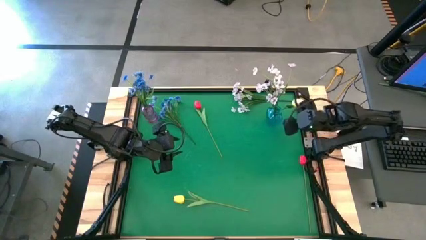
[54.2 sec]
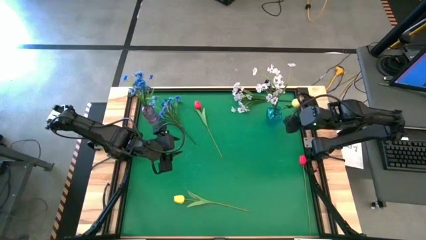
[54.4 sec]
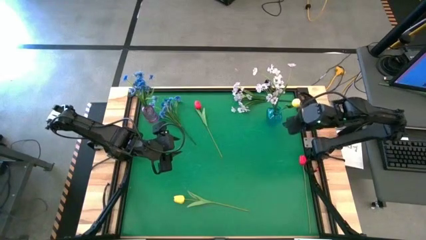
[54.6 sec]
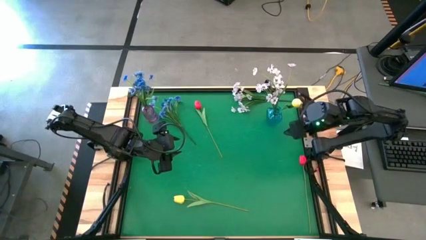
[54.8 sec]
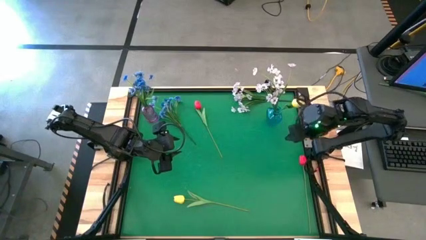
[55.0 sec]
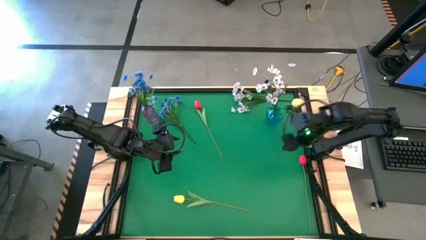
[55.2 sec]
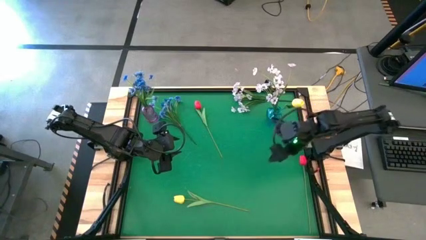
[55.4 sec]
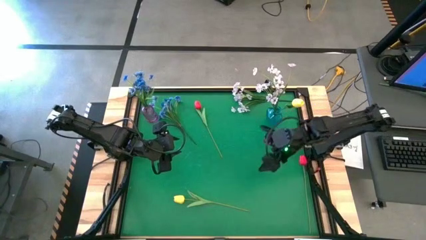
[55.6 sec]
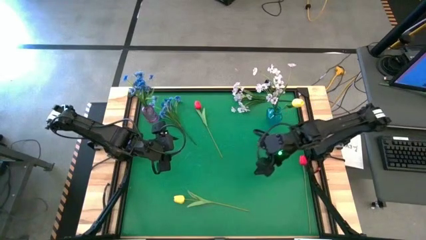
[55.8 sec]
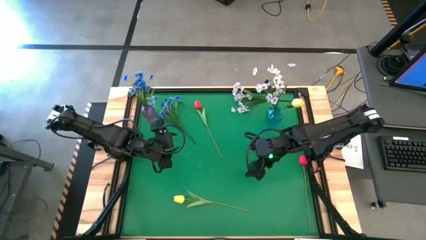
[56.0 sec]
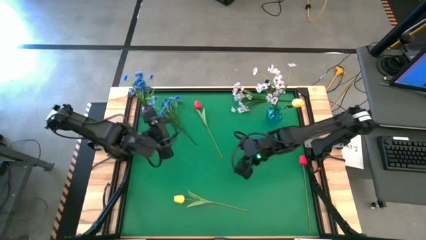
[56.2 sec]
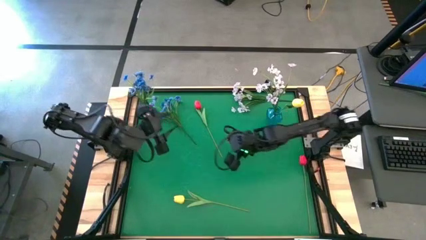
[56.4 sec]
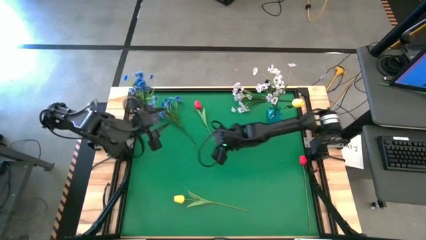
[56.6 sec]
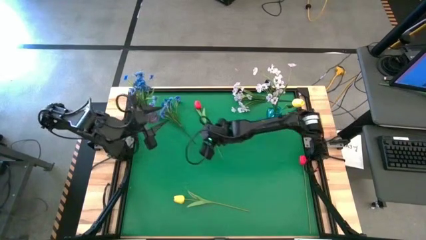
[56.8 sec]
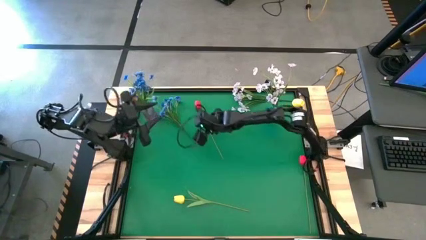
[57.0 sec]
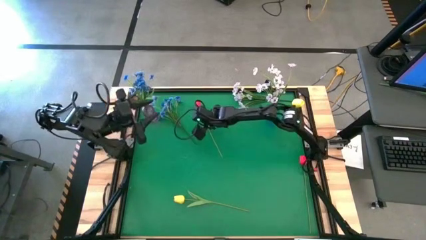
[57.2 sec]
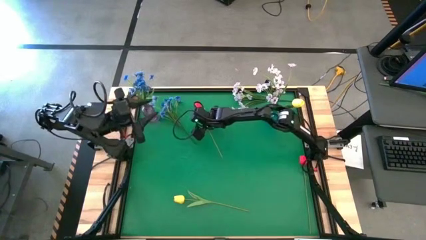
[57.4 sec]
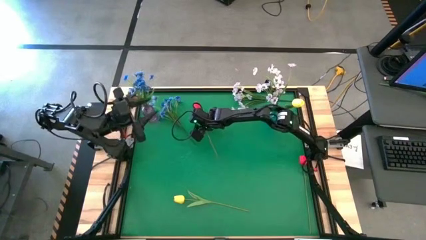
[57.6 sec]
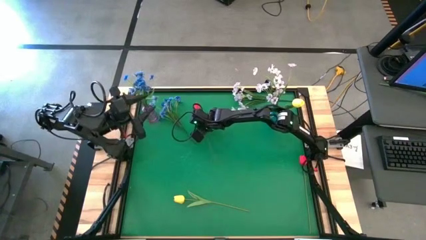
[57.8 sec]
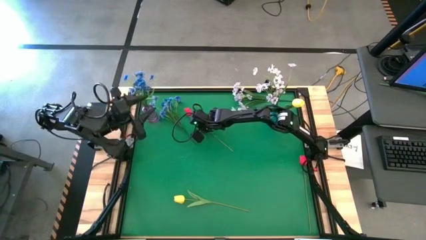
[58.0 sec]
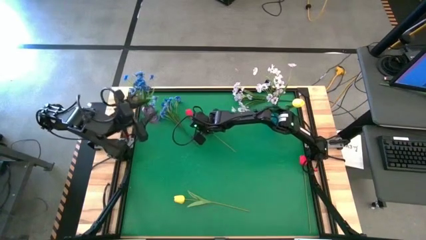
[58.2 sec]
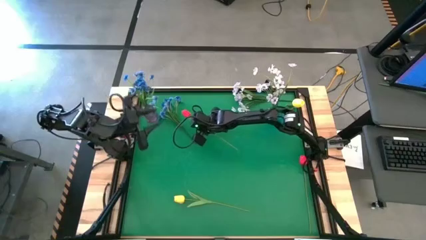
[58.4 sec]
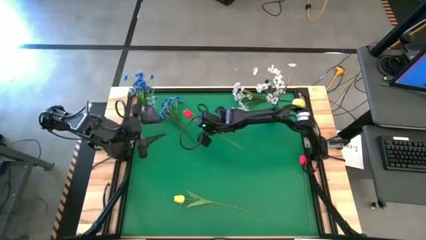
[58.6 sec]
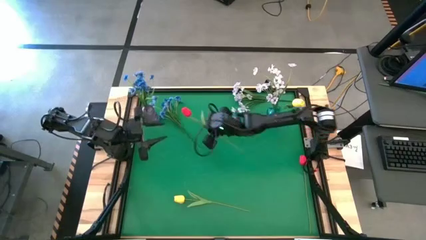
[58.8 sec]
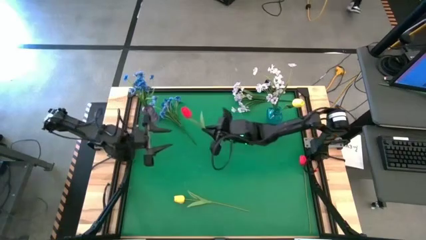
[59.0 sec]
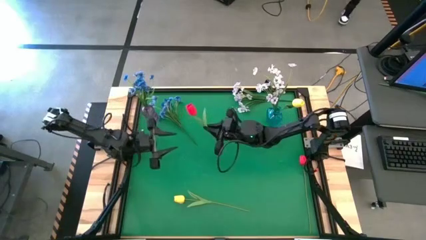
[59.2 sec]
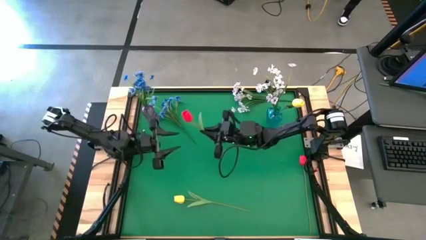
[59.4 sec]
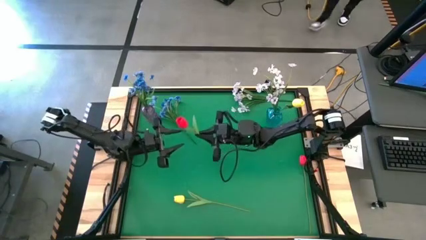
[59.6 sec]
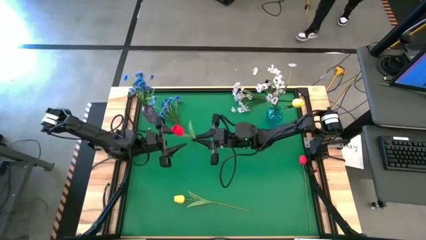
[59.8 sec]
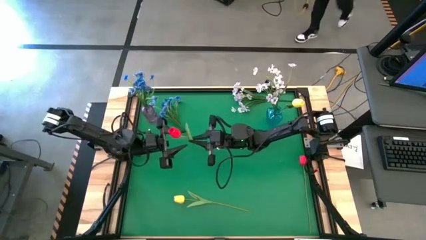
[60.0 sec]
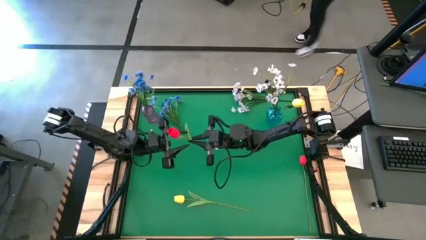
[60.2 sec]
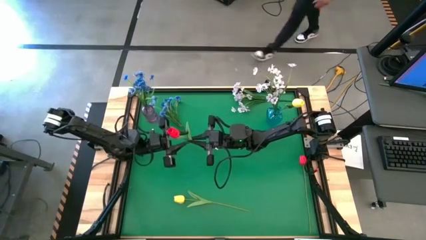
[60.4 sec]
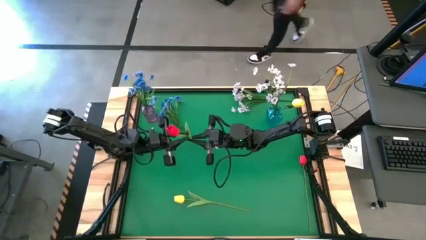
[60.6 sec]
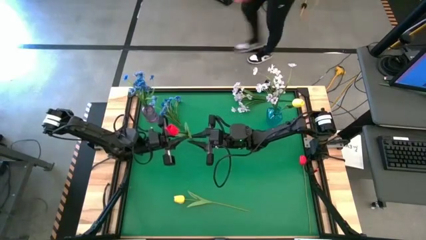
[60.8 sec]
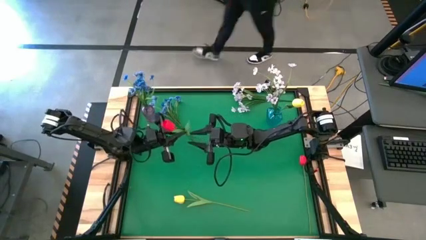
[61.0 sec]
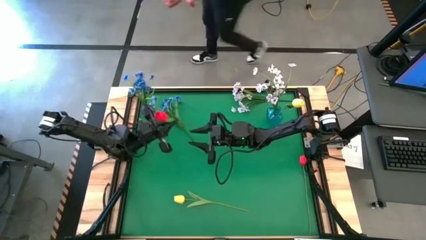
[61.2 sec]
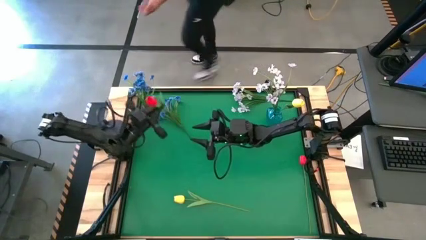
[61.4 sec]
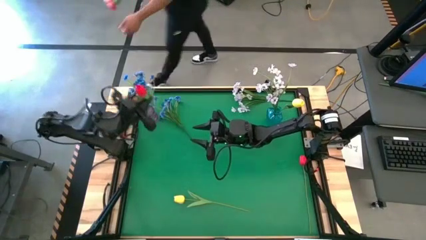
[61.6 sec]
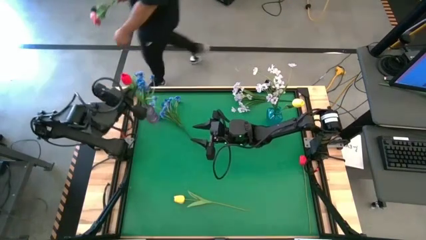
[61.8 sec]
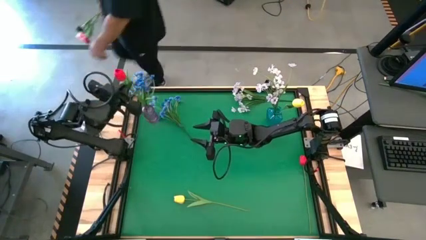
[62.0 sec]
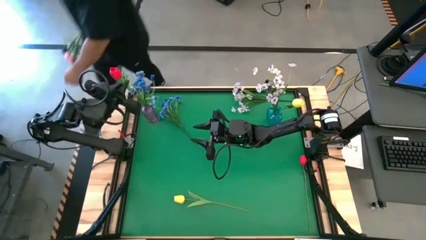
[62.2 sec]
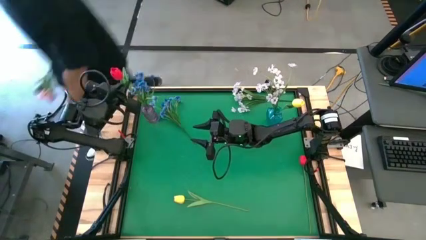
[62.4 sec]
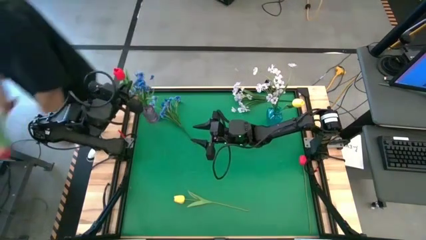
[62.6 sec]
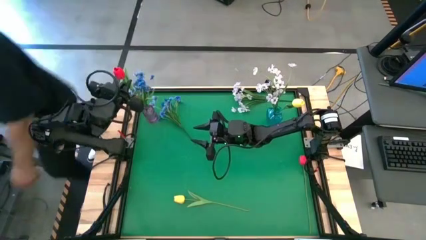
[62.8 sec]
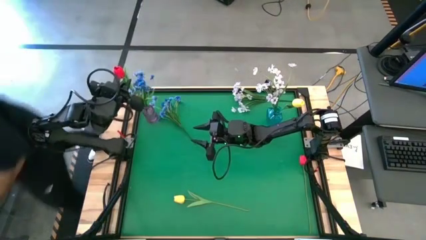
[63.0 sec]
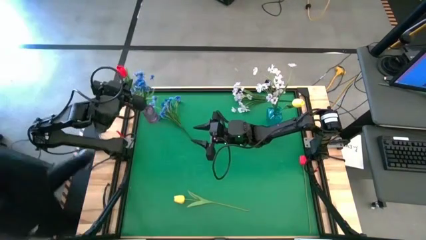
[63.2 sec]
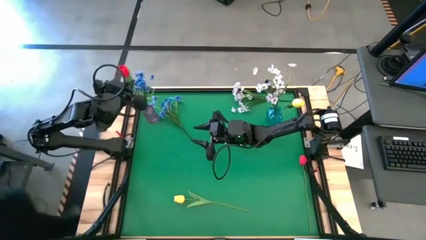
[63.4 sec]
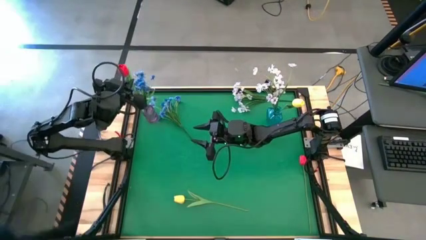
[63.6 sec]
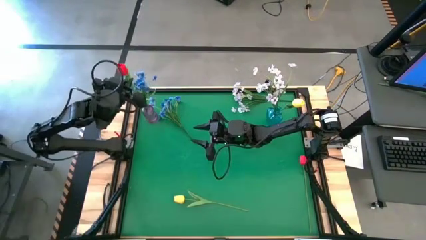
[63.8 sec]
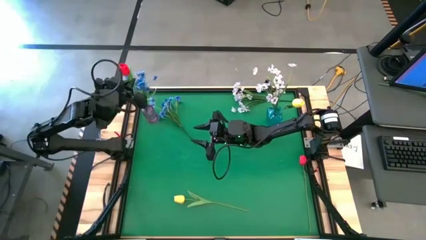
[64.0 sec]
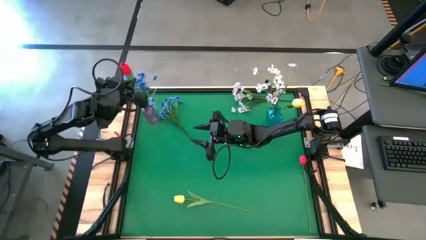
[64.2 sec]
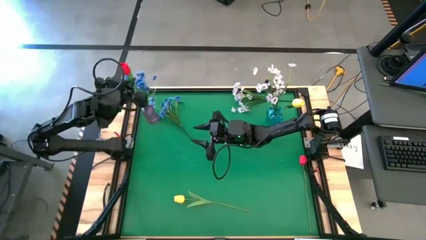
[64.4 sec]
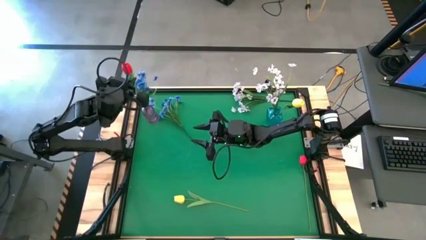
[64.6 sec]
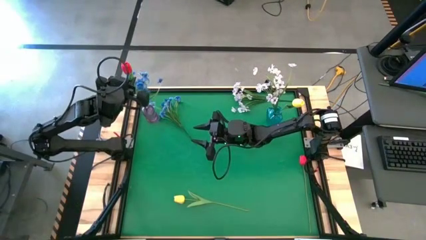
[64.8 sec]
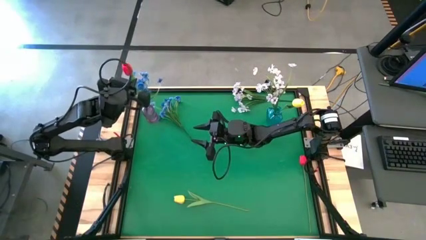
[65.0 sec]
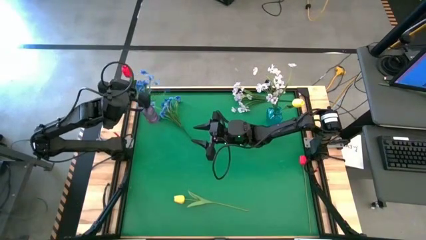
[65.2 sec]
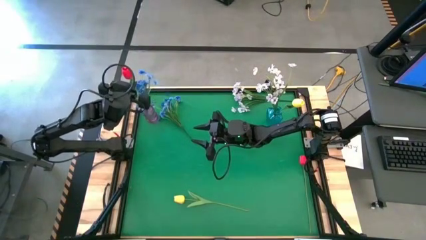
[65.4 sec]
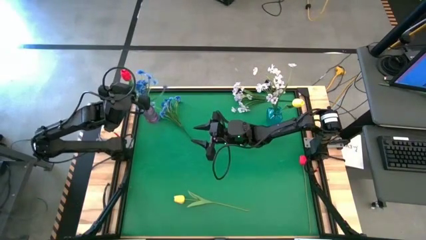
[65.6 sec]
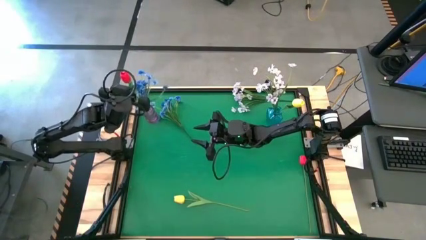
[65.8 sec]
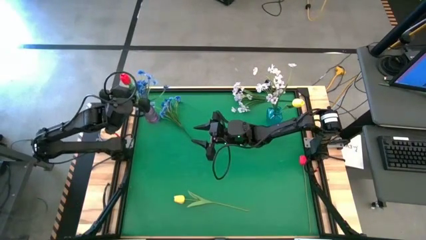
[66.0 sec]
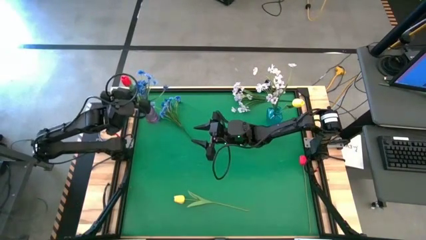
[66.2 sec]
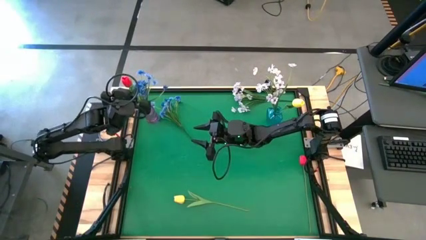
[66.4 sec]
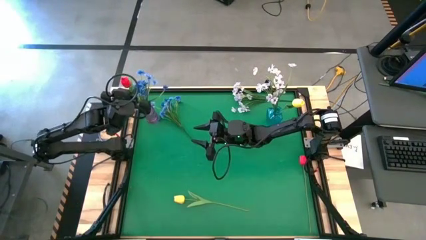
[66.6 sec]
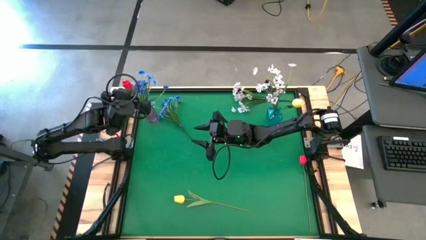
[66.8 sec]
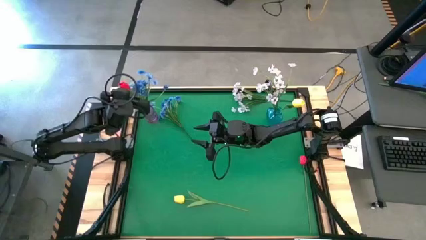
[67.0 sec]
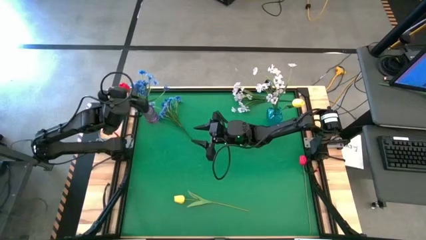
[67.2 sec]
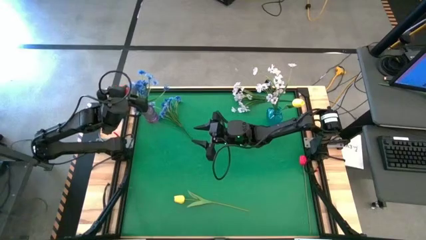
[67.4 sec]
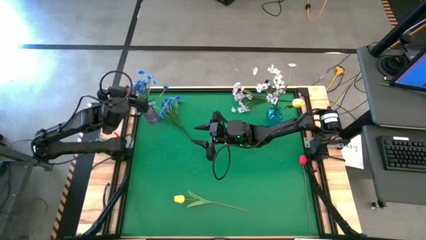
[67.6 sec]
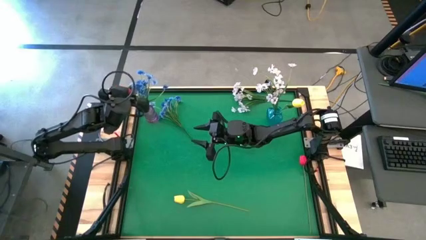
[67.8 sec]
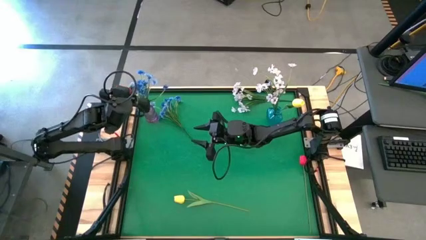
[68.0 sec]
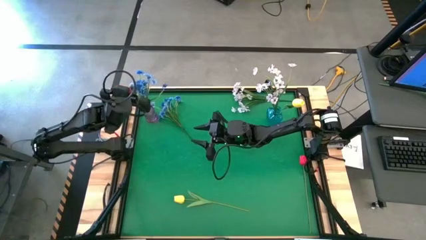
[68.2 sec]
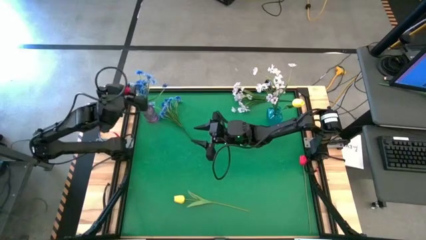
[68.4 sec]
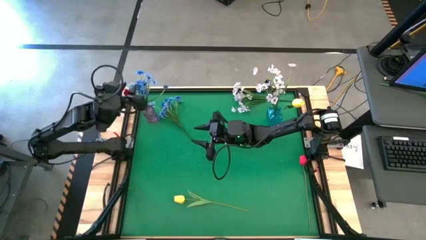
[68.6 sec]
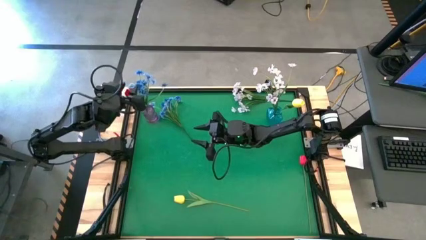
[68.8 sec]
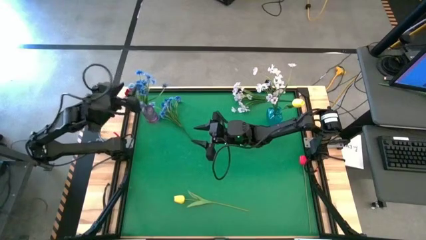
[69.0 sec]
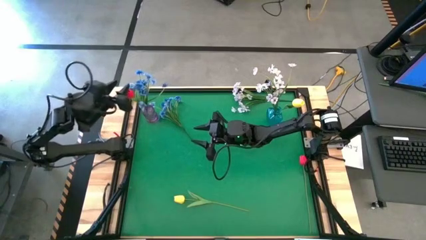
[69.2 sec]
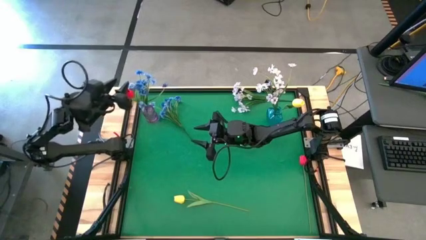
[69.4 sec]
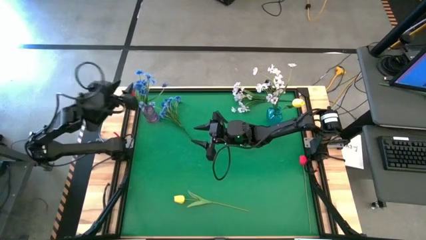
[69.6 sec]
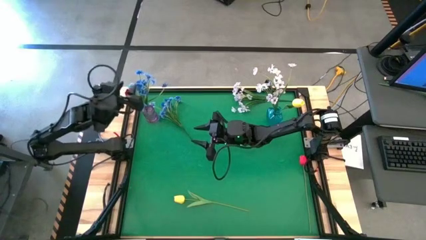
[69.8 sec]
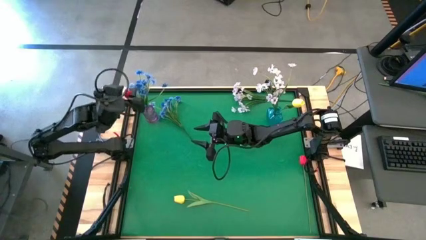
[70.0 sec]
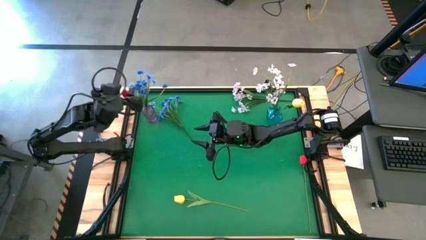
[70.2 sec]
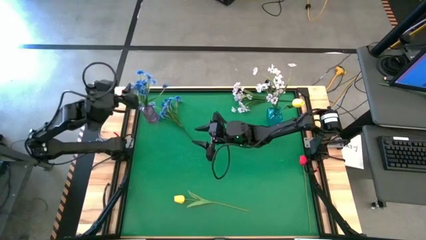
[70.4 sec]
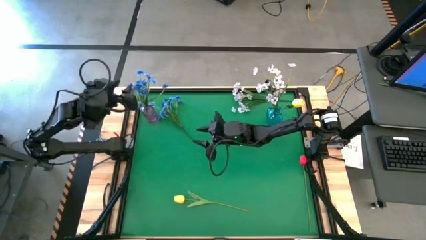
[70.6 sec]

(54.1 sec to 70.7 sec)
Task: Sort flowers into vase by color
Put the top red tulip into the purple vase
